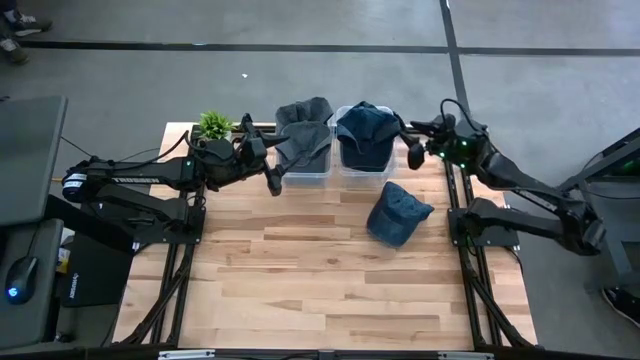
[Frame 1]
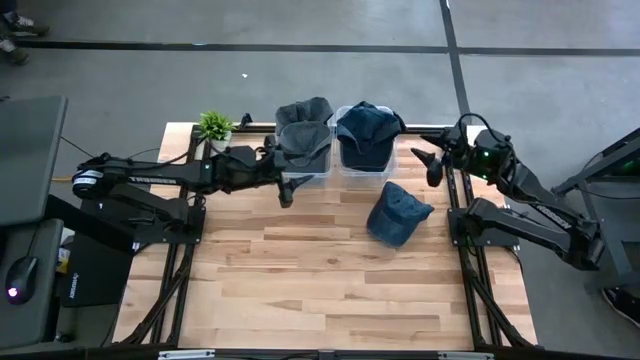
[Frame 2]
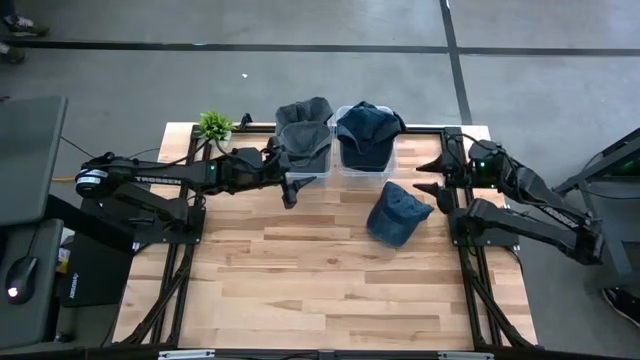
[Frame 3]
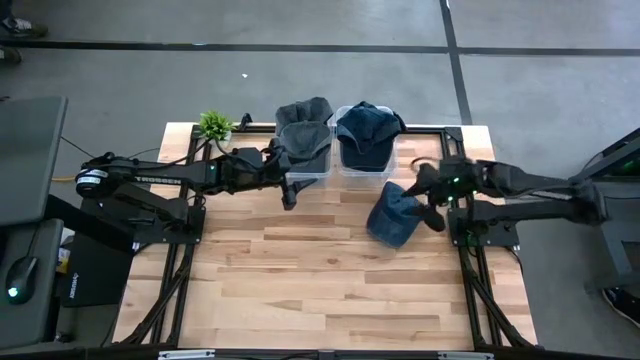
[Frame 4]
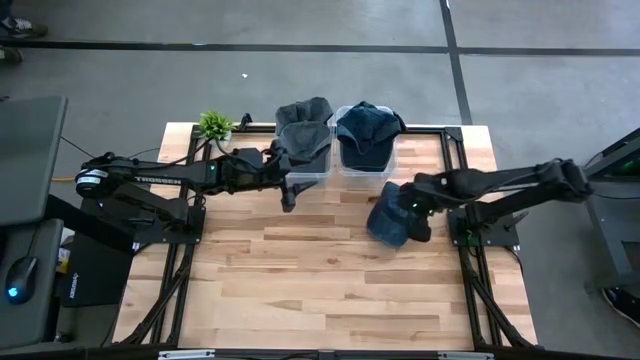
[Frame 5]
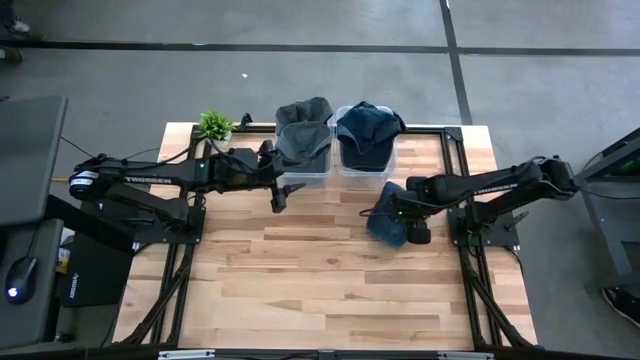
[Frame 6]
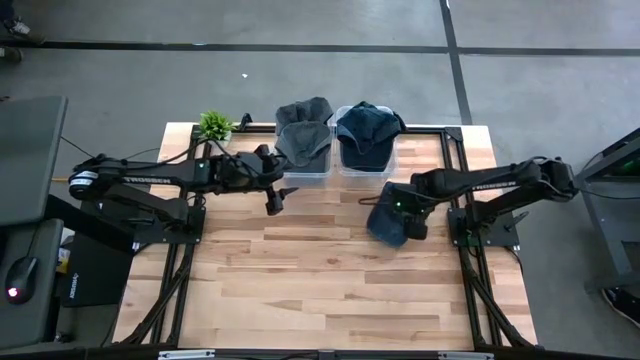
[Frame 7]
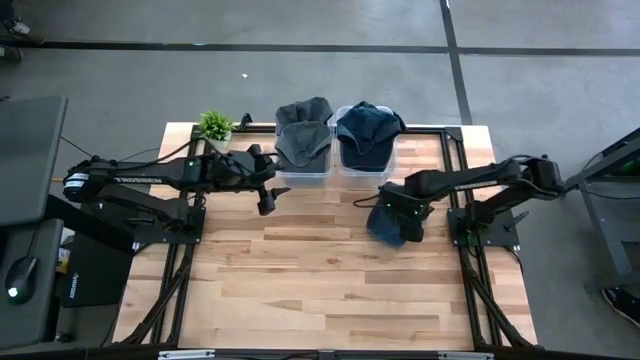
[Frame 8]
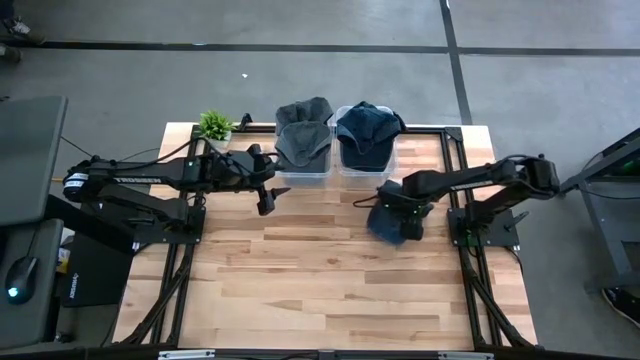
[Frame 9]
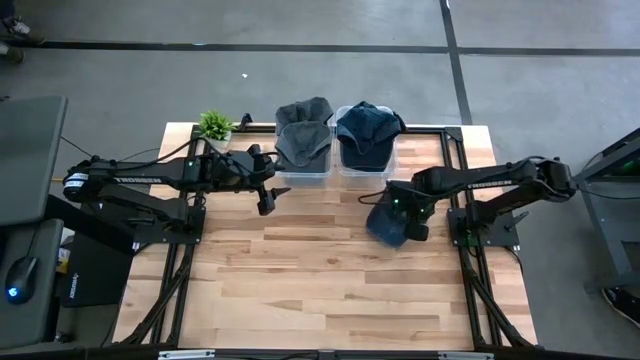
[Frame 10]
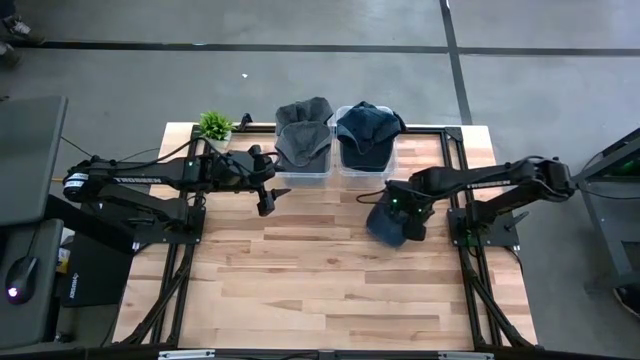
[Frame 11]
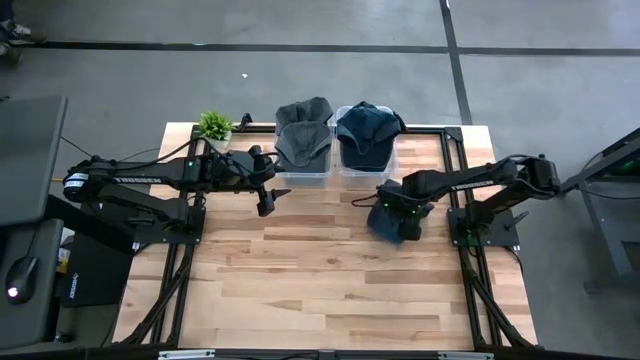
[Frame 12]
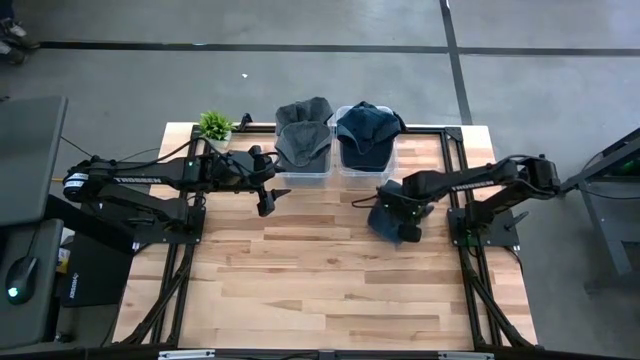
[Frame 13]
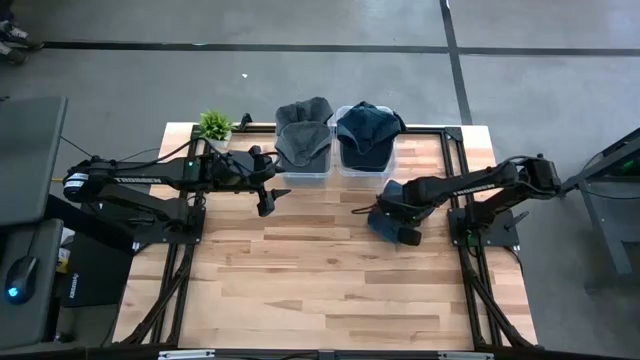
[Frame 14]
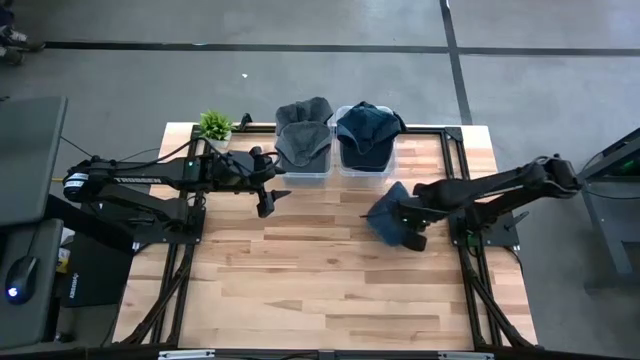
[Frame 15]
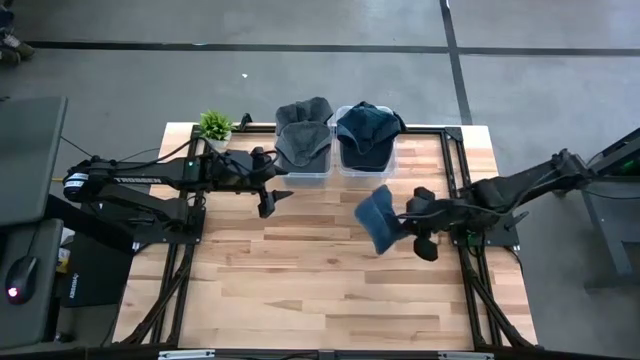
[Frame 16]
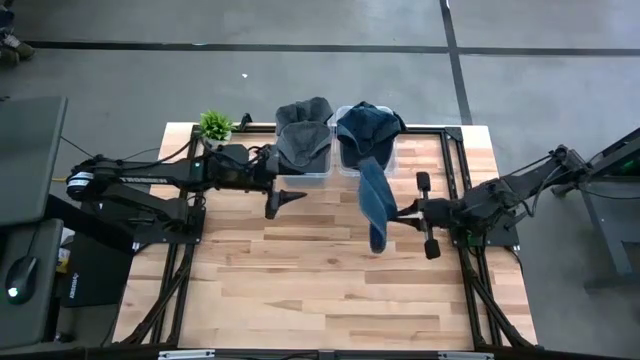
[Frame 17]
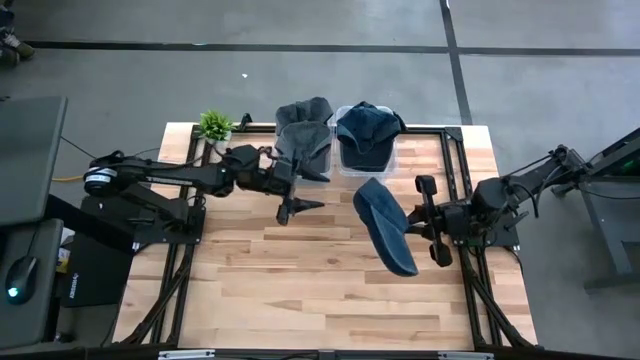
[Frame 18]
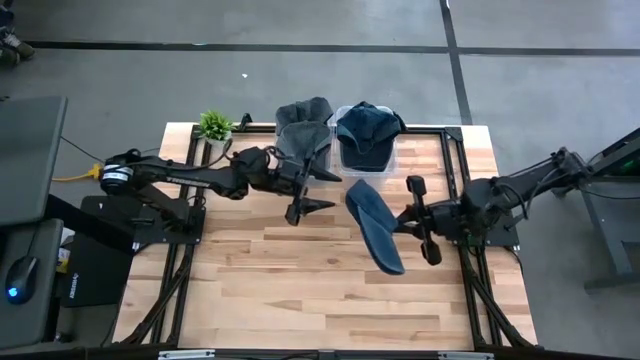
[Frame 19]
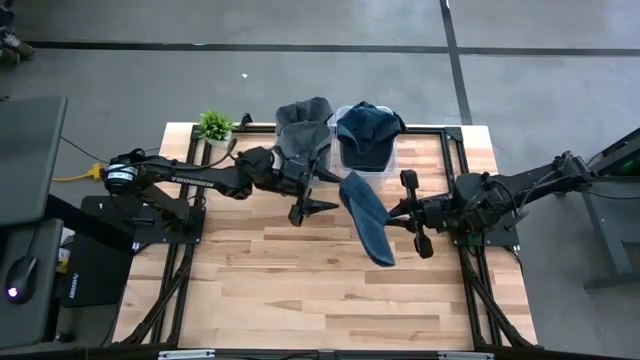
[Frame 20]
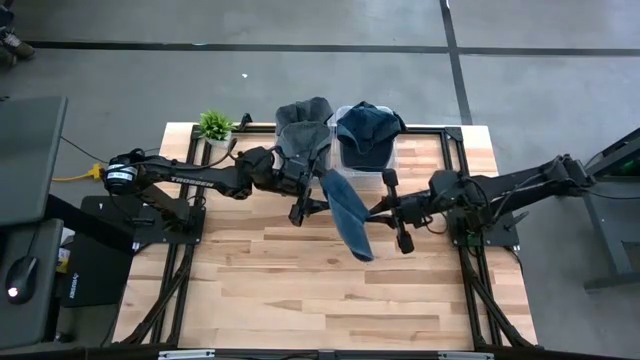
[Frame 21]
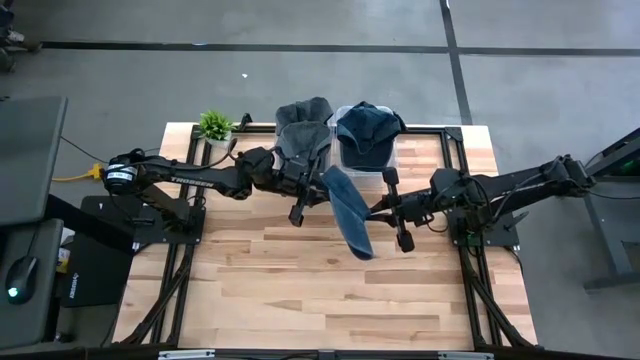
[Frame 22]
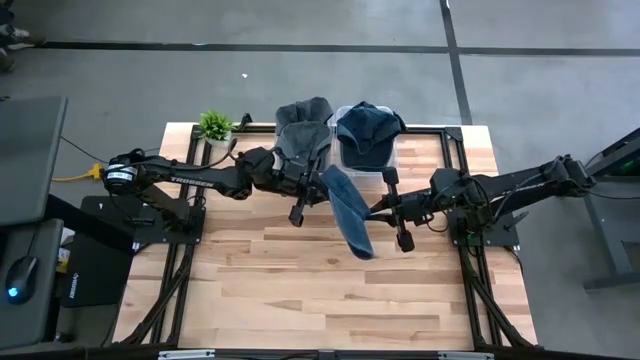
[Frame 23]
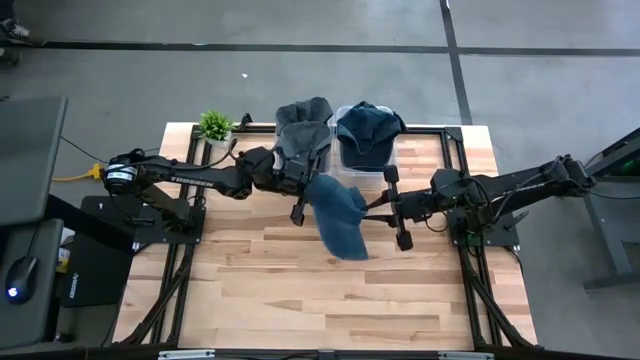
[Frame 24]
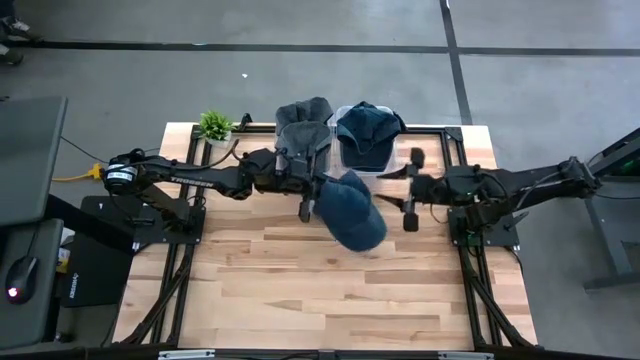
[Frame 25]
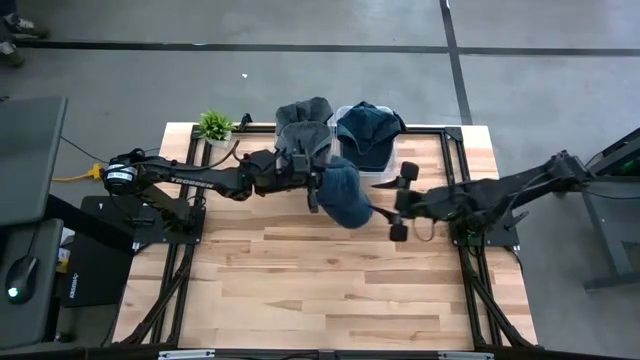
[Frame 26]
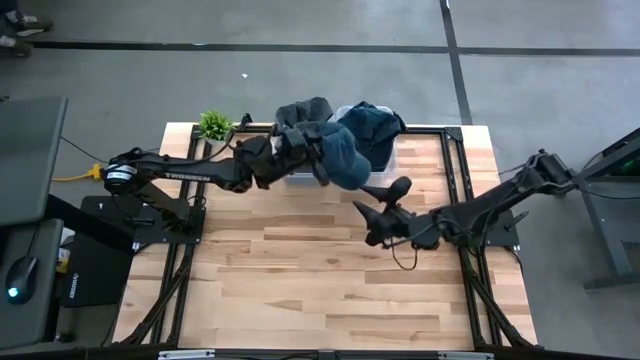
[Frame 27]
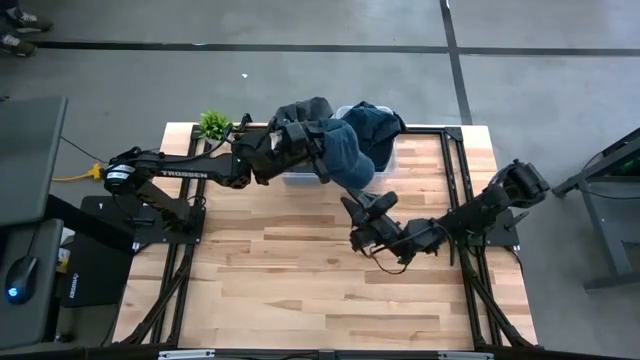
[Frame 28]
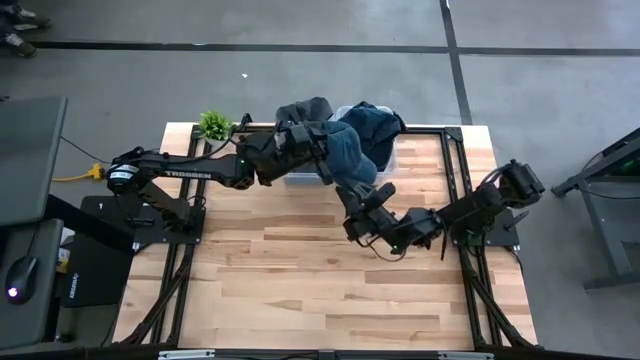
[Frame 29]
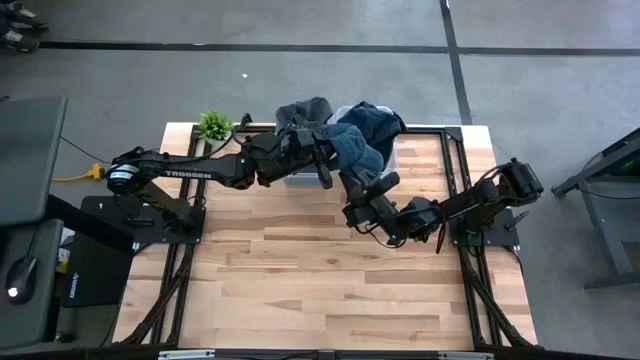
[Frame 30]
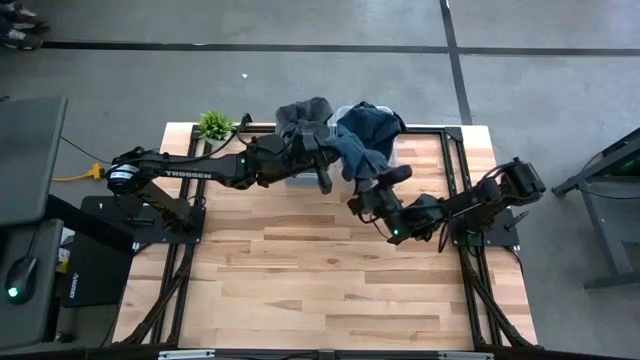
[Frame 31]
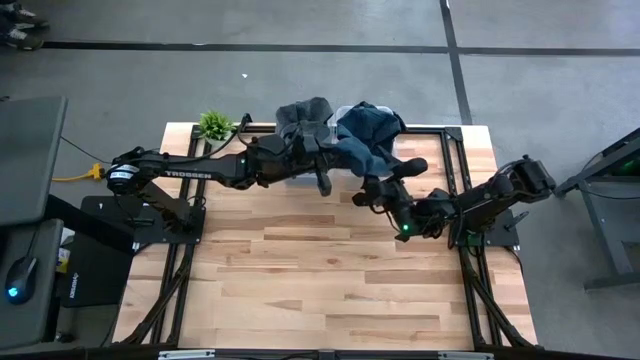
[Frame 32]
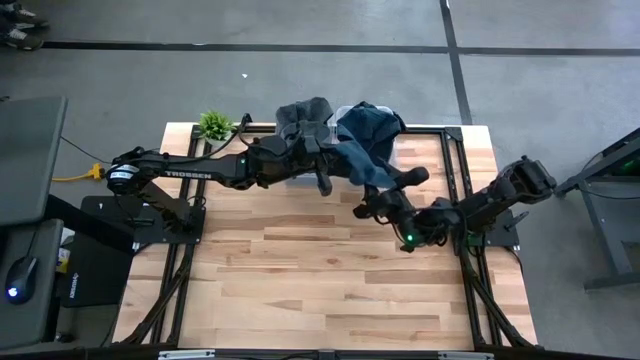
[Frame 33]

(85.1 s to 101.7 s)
Task: Pick & Place hat
Put the blue cap into the right transparent bin
